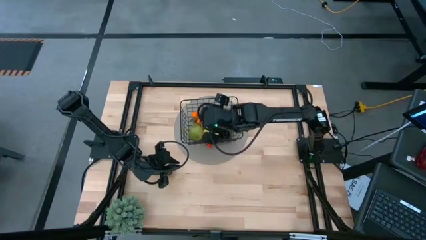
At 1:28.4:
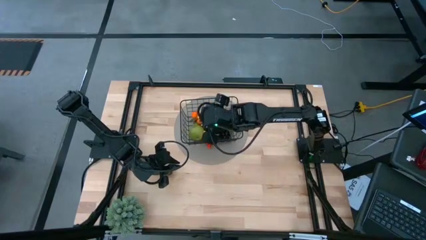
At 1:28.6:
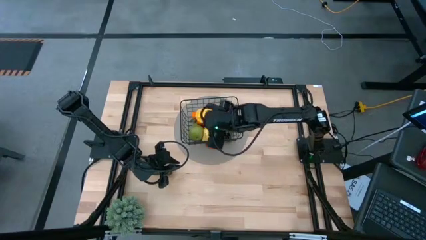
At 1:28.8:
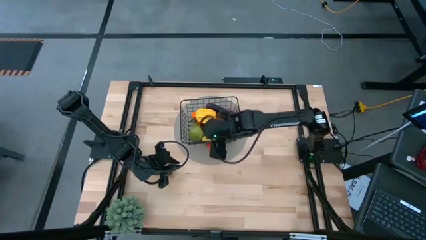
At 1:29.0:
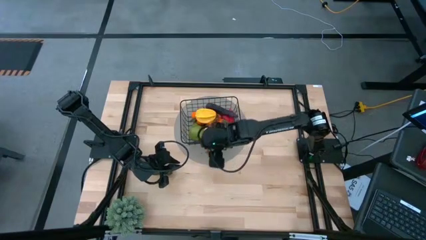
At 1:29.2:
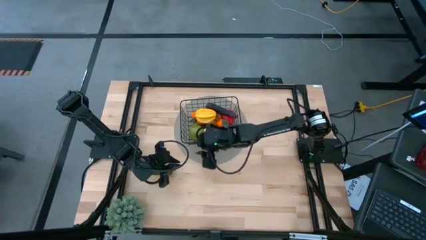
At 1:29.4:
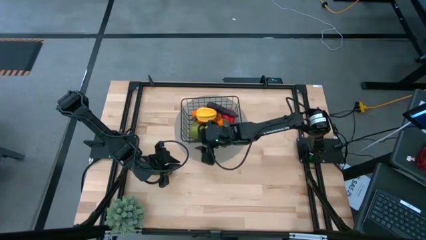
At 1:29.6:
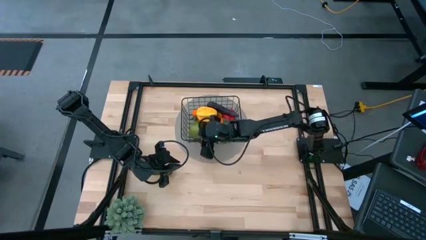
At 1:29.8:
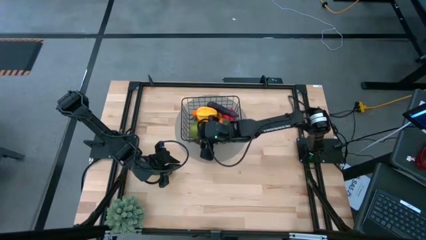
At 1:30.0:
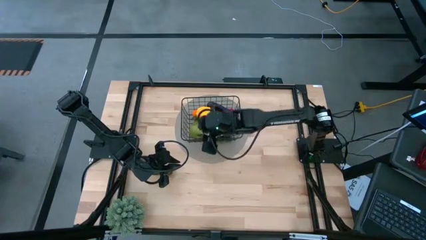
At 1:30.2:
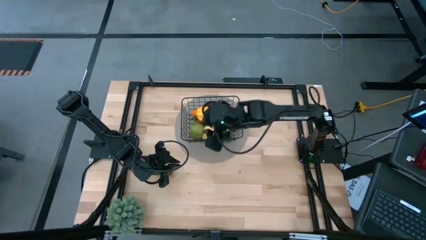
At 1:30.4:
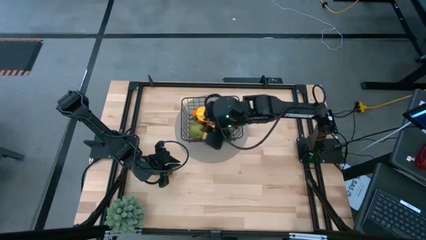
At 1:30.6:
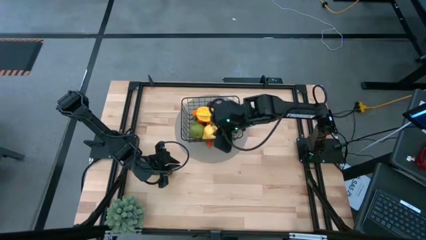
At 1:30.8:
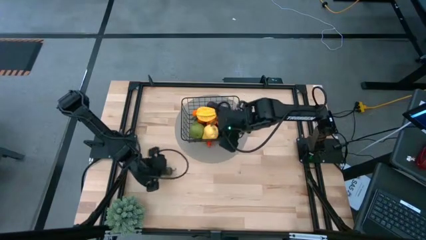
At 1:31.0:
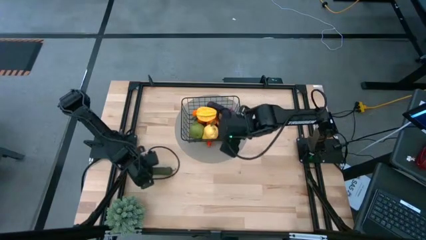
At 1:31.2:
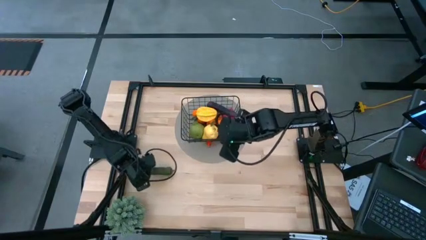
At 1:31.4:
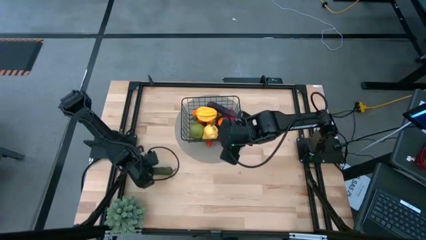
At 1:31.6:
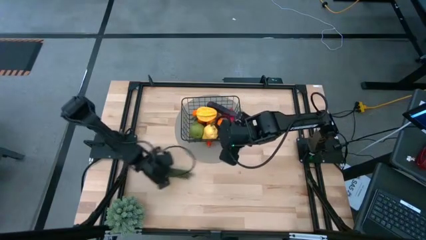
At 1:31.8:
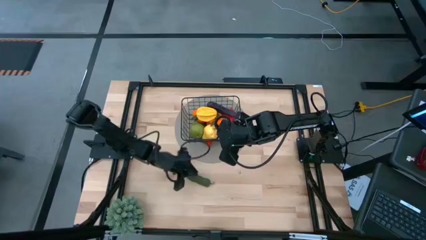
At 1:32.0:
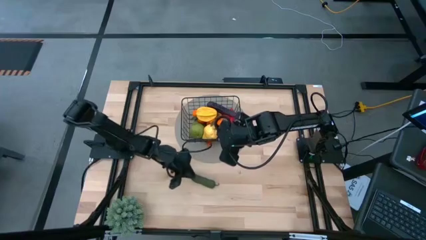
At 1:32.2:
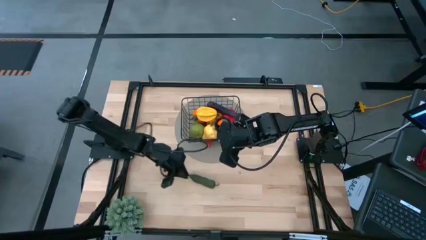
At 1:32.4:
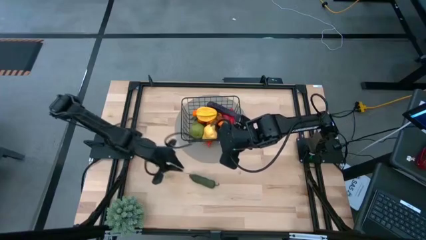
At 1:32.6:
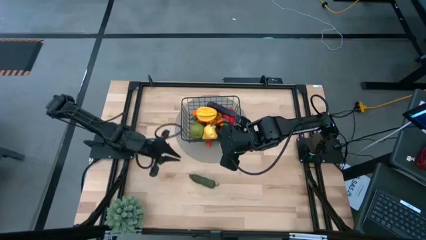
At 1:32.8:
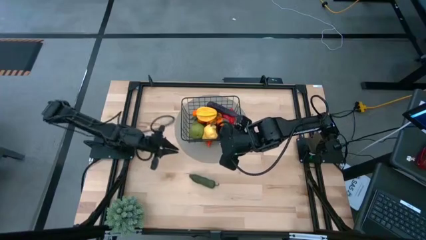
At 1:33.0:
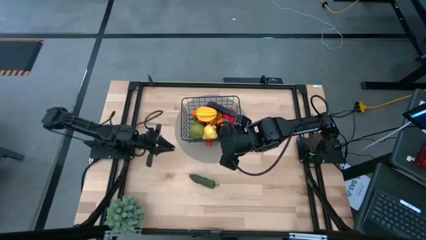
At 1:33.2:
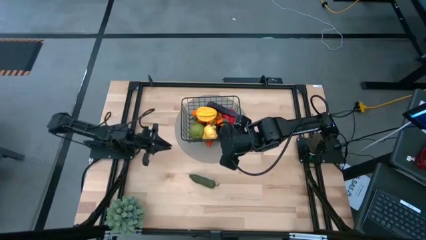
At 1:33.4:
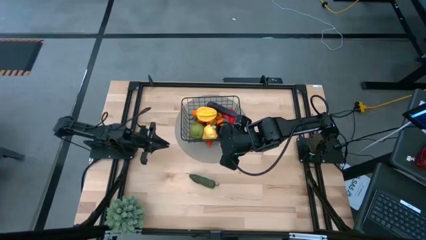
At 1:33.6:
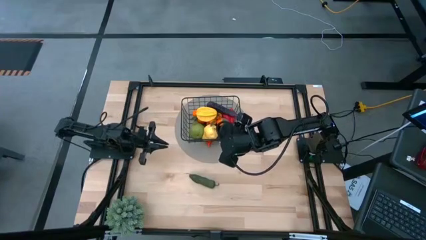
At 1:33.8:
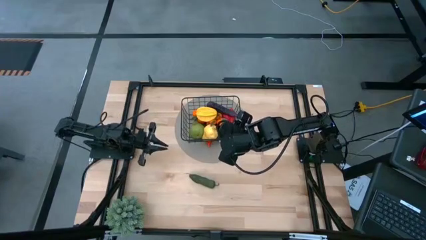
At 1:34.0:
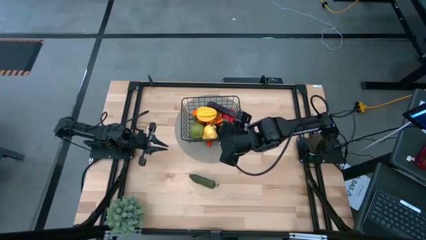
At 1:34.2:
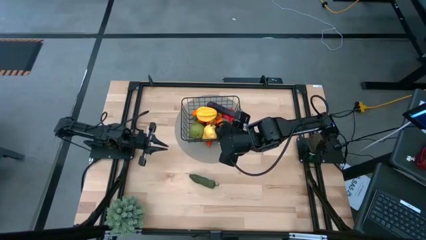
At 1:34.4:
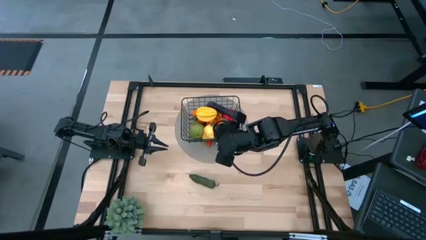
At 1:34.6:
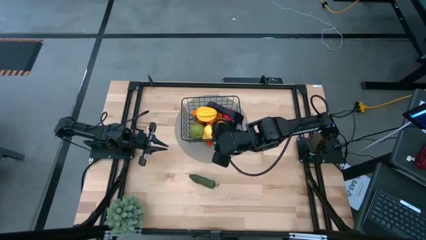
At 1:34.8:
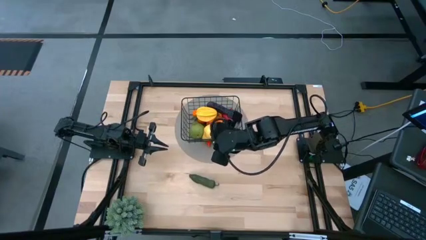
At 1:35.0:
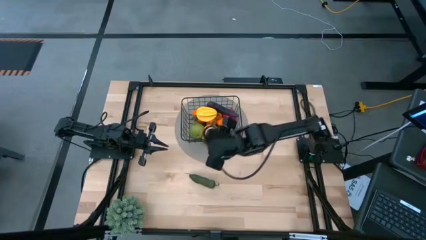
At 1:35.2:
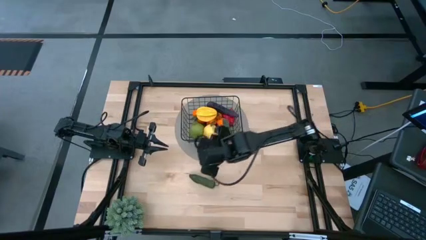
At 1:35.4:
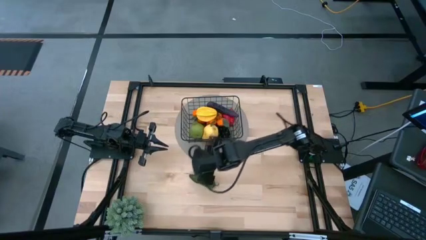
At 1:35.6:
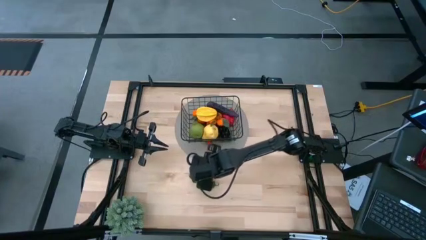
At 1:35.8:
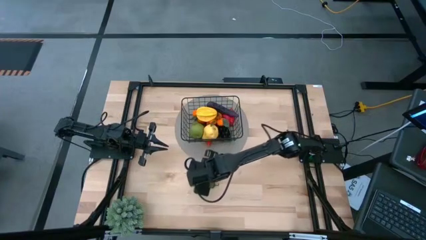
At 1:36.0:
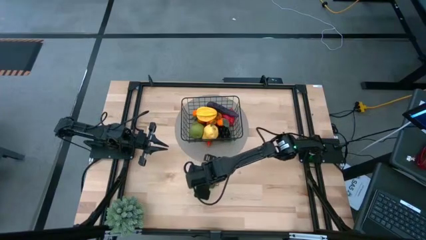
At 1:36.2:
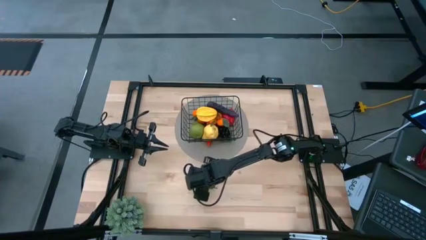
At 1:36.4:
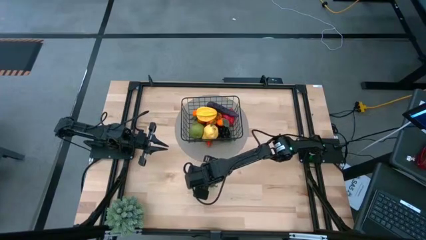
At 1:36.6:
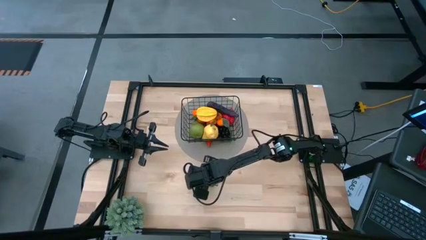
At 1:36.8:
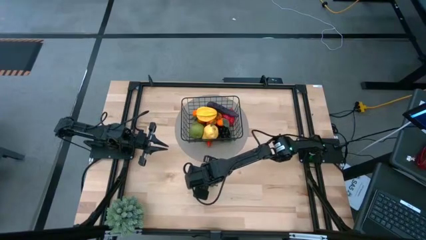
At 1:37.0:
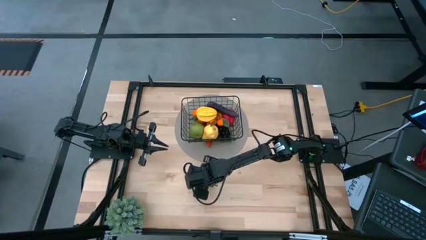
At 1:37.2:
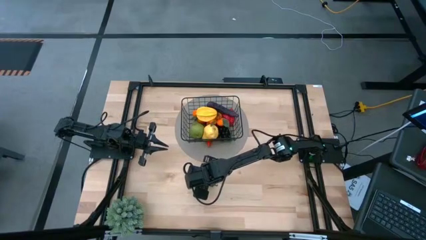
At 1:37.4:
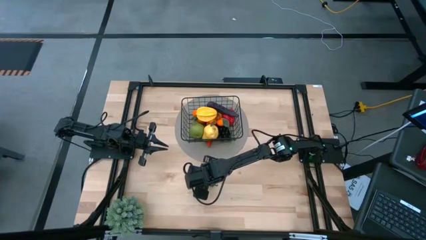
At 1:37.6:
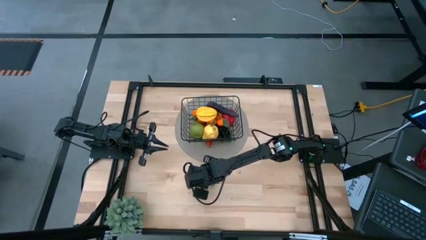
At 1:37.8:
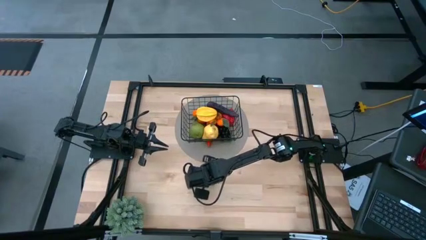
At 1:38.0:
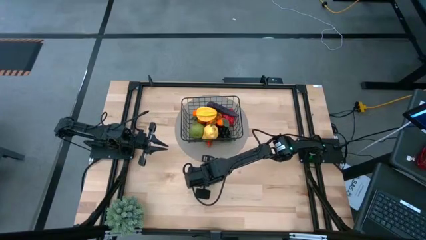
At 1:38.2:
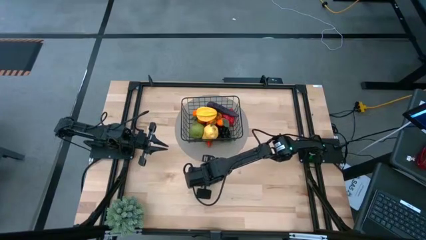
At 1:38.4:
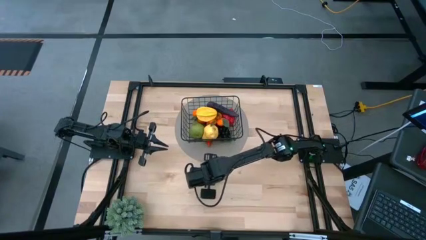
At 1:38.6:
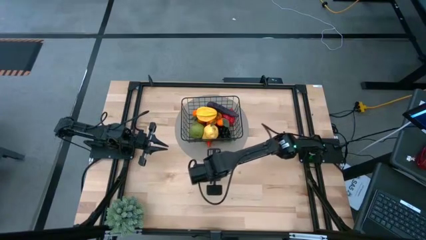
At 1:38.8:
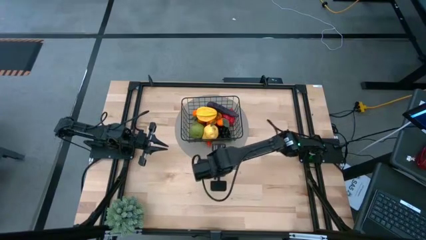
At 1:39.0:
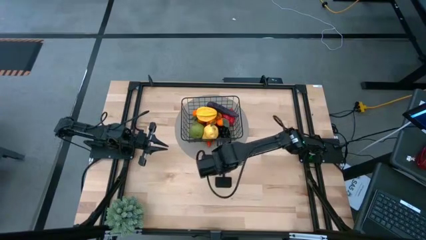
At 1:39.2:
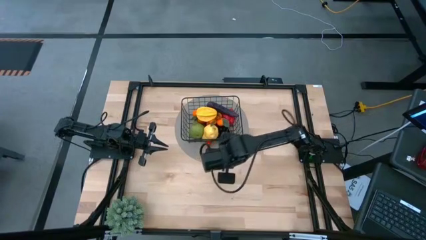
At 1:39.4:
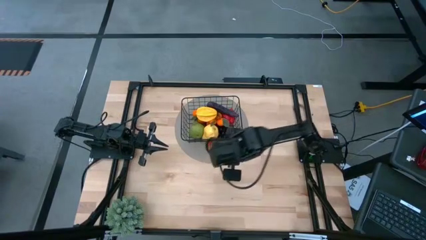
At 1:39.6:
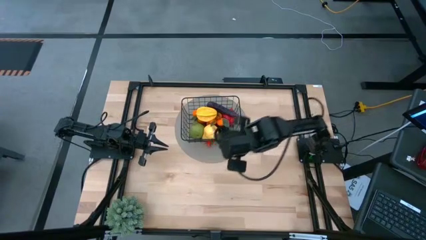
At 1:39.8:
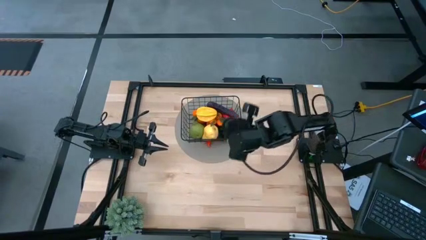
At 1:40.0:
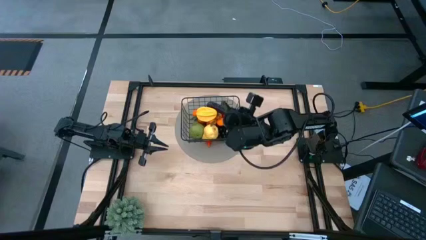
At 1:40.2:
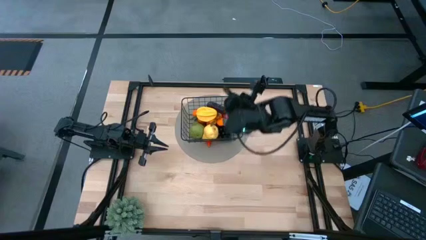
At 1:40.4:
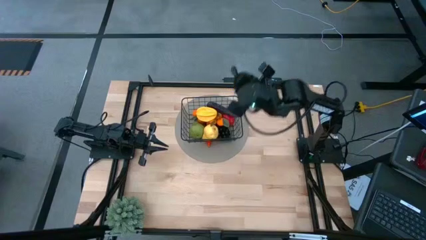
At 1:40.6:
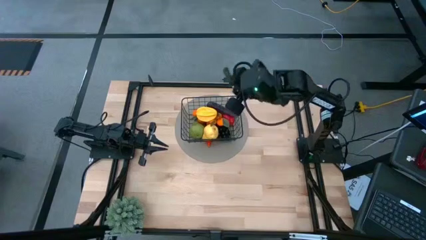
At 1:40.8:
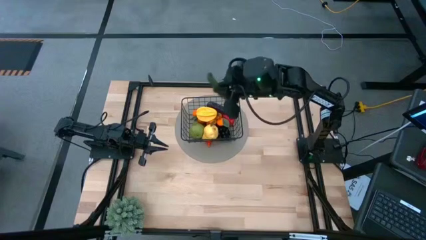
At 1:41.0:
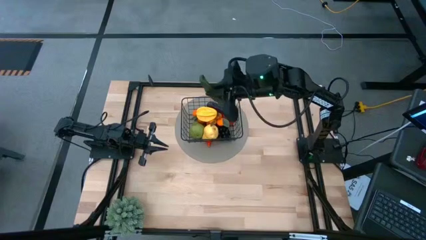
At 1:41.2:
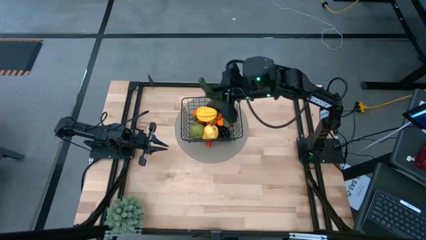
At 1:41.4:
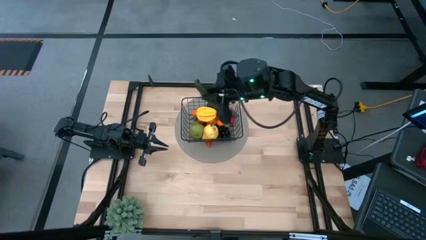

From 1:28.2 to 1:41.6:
Task: Build produce basket
Put the green chili pepper into the wire organizer

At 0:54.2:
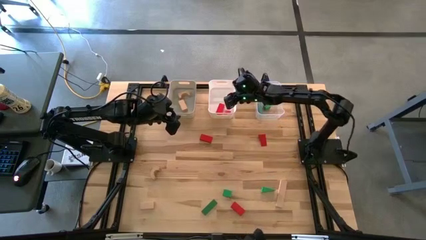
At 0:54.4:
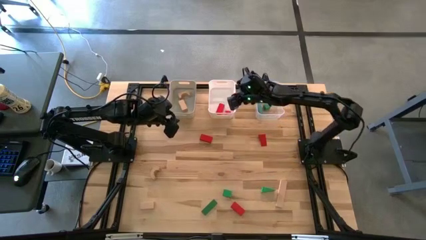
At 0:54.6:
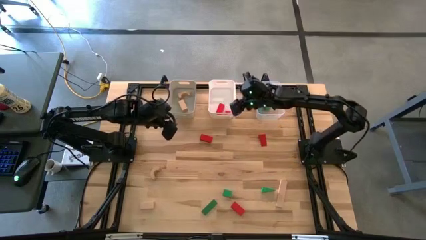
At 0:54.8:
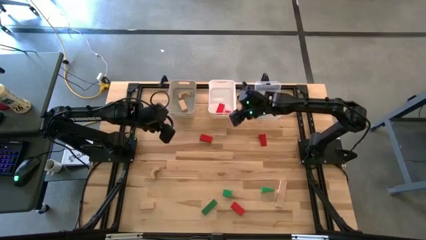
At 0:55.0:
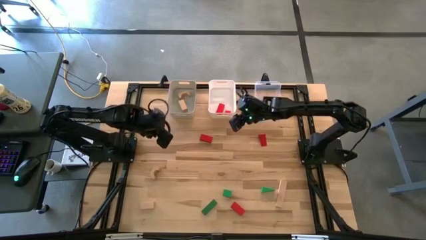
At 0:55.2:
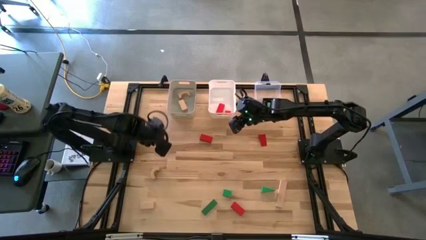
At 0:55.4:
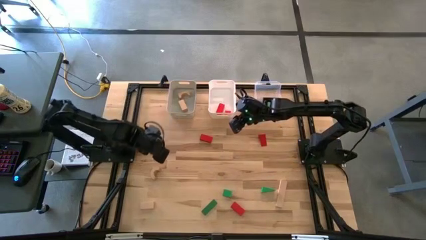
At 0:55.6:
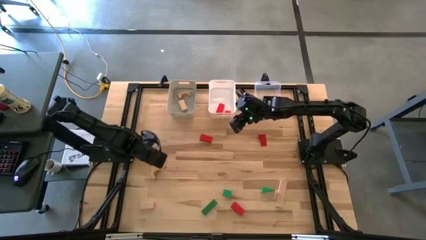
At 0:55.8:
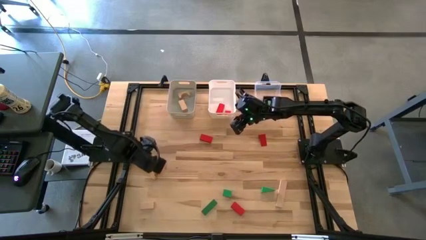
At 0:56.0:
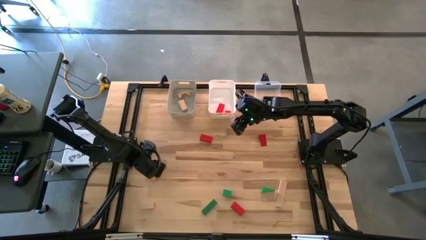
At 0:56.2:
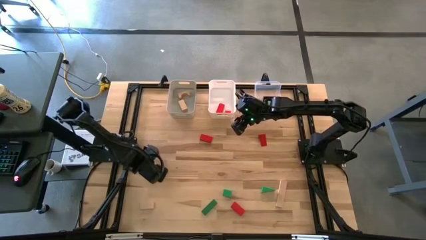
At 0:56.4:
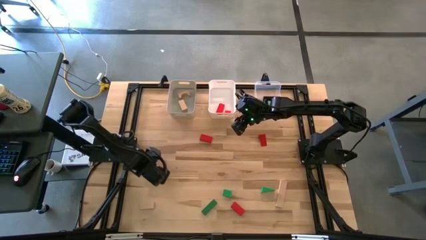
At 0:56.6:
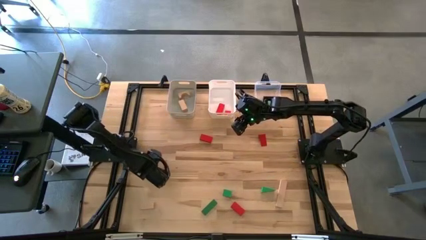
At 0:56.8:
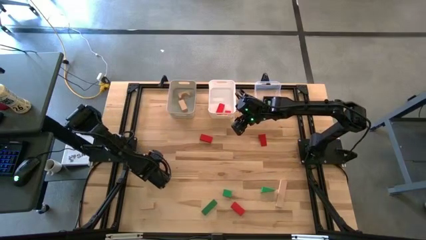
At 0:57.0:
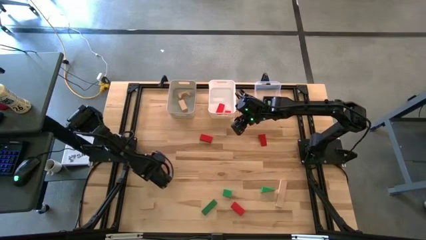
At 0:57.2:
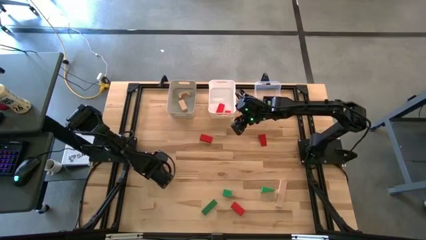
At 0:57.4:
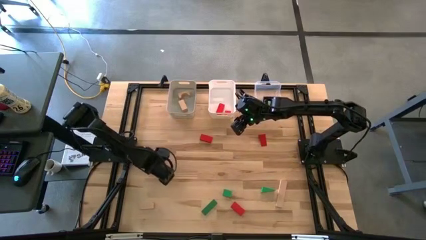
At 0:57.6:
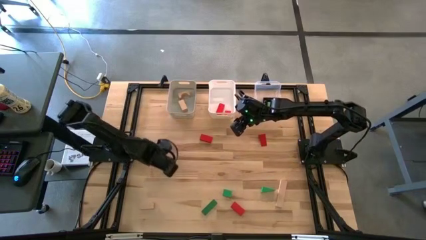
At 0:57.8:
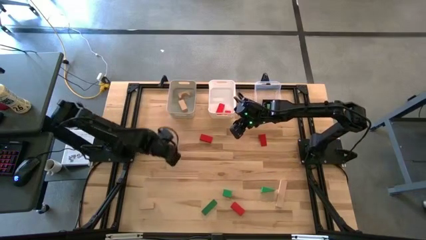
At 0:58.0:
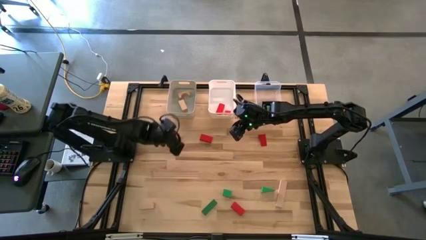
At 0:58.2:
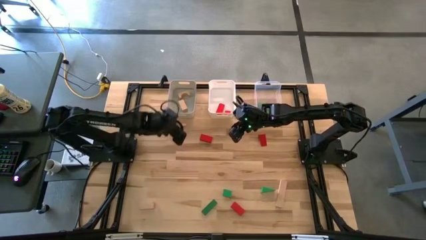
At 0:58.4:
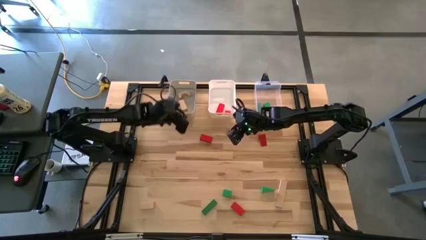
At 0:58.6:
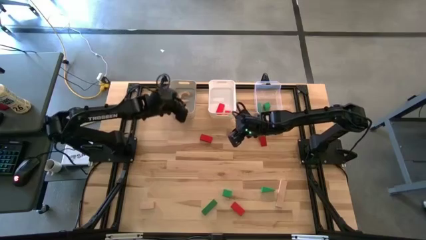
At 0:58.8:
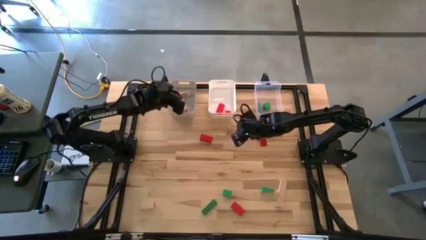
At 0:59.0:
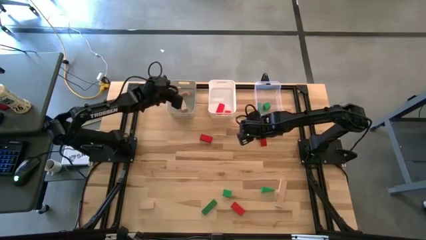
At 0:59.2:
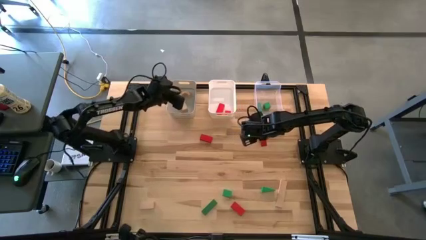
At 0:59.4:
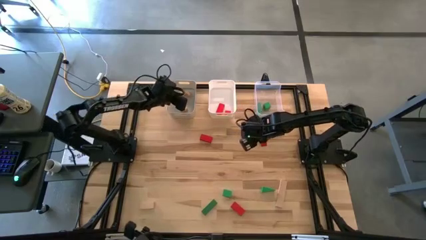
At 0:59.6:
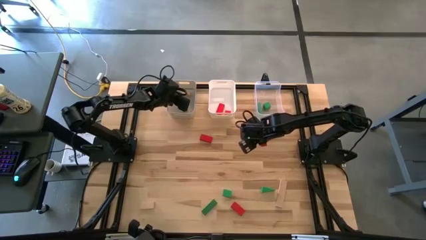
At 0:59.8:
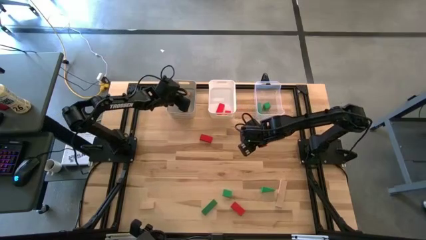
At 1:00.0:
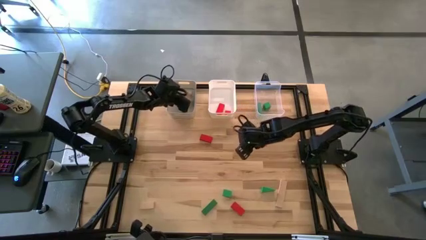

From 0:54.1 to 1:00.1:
Task: Sort & place blocks by color
Put the top left brown block into the gray bin
